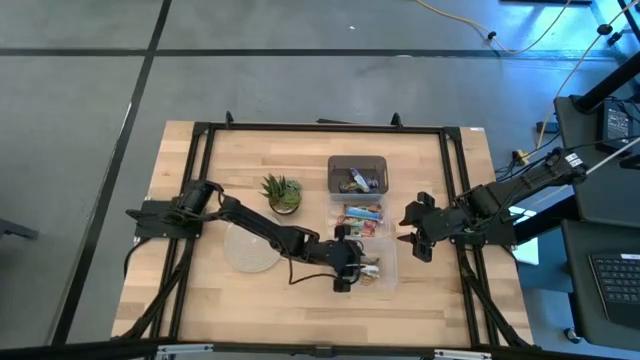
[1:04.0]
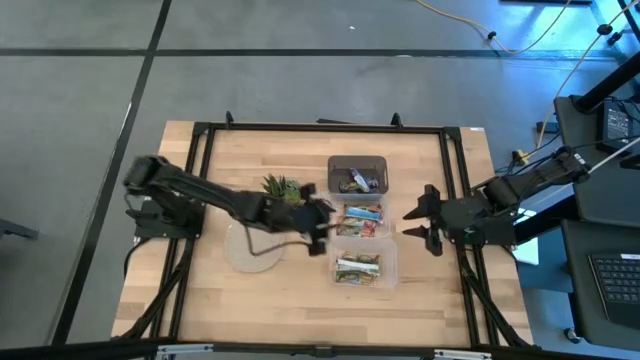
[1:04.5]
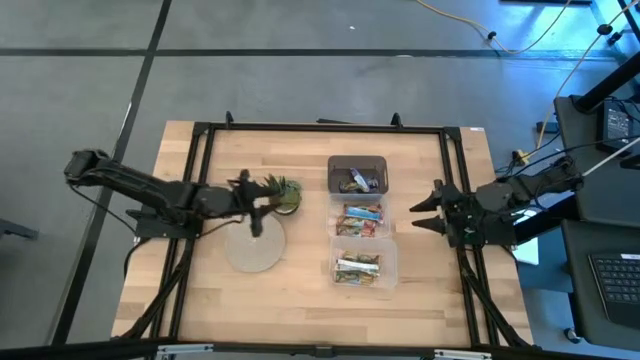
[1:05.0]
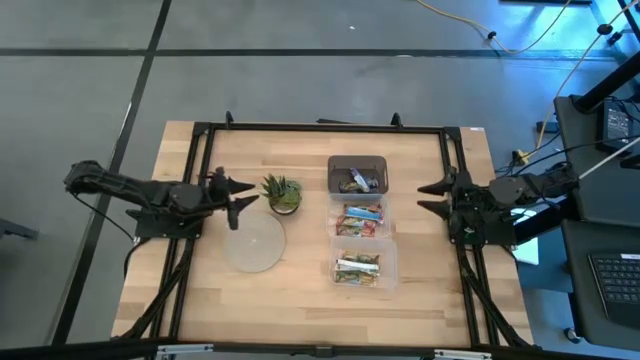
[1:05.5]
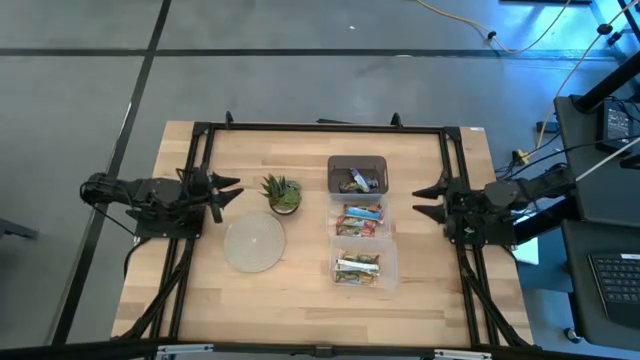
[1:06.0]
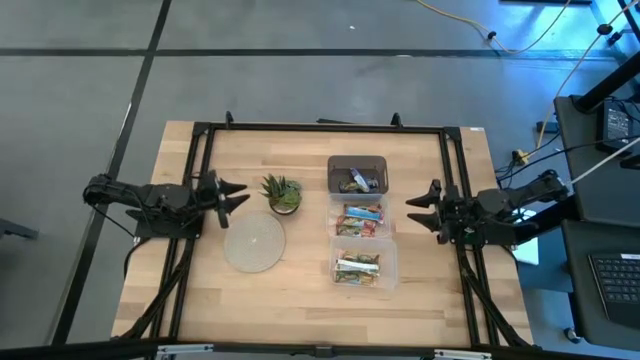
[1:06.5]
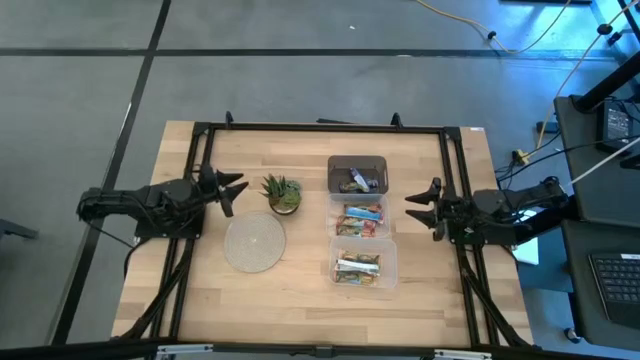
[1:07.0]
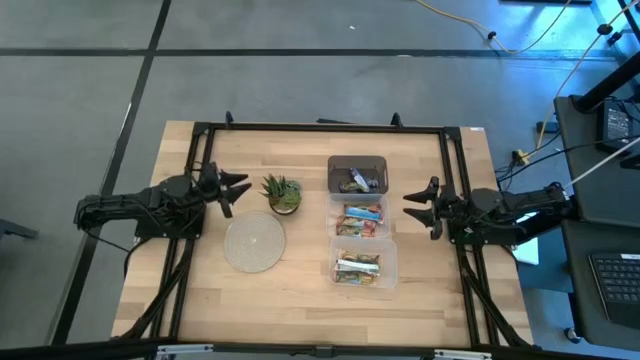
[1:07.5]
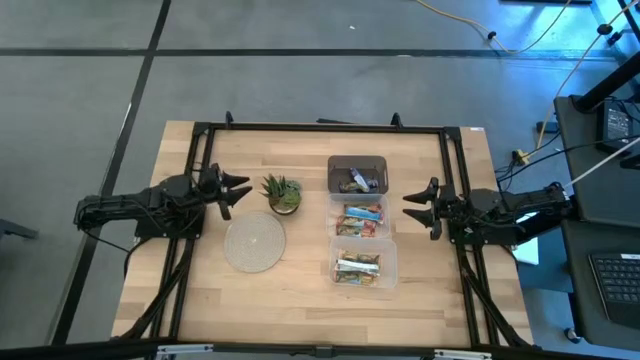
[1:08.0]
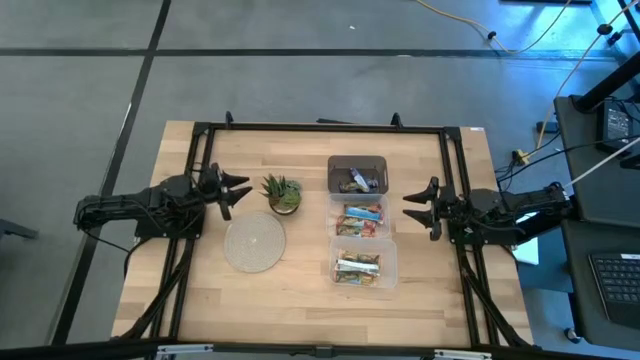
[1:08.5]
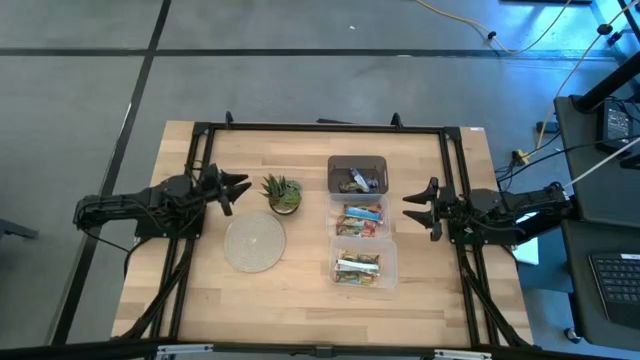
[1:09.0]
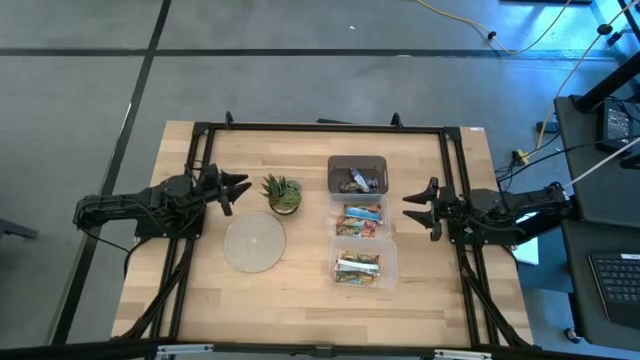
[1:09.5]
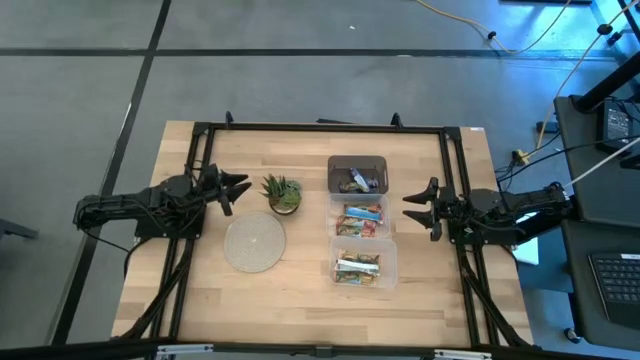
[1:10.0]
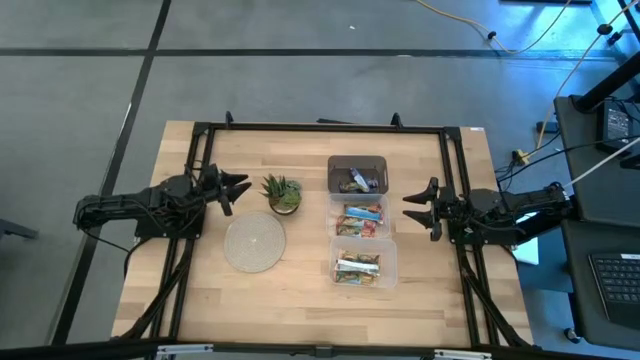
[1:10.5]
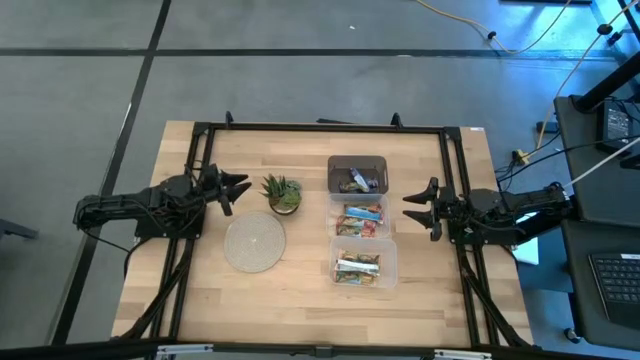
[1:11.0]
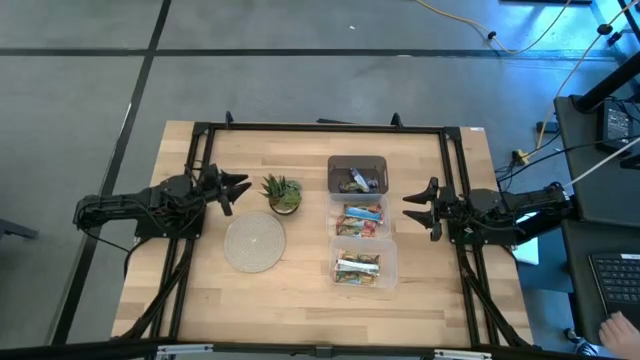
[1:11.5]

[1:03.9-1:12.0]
Task: Pick and place Granola Bars by type
Return to Home Position

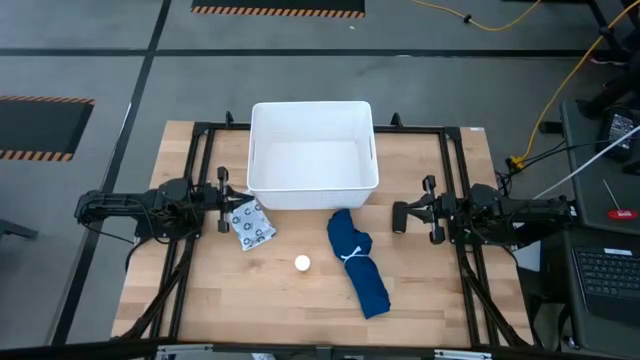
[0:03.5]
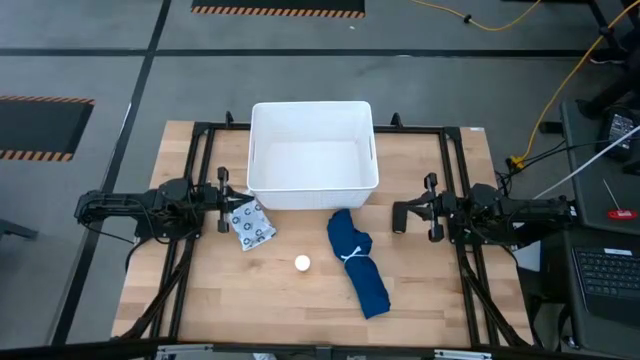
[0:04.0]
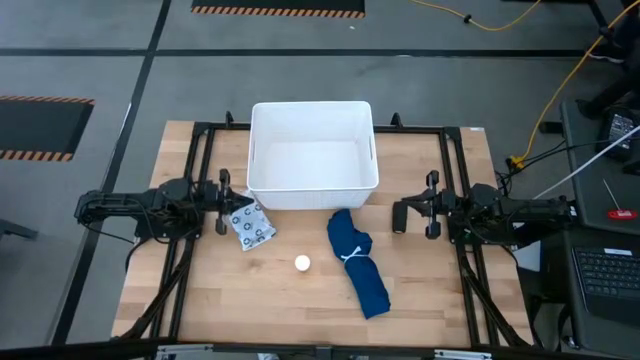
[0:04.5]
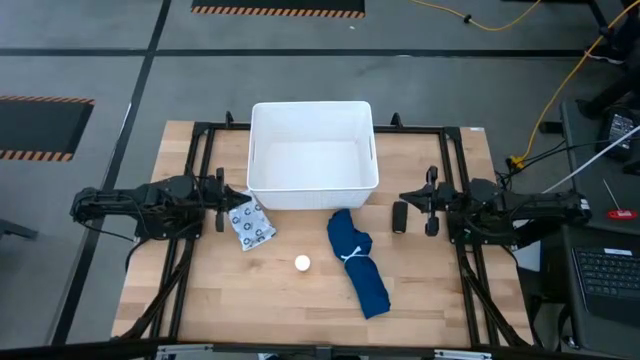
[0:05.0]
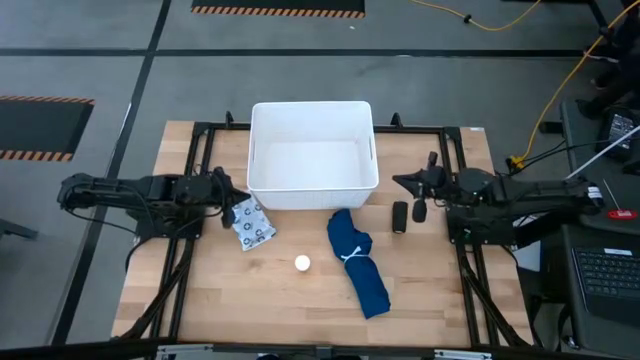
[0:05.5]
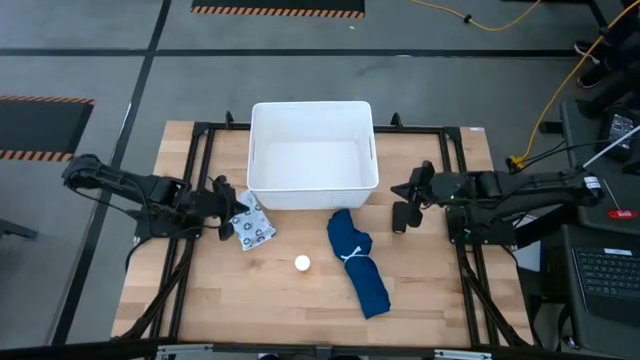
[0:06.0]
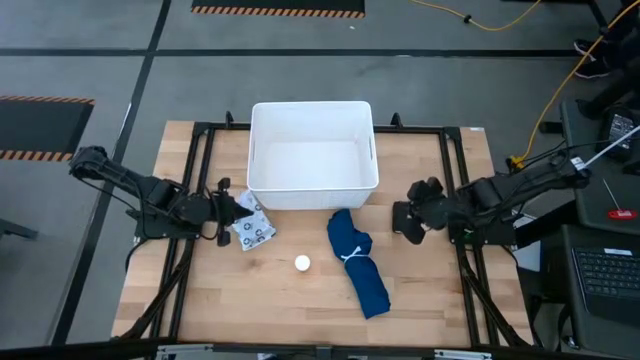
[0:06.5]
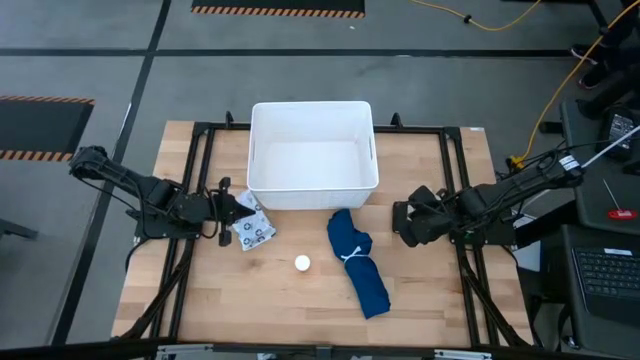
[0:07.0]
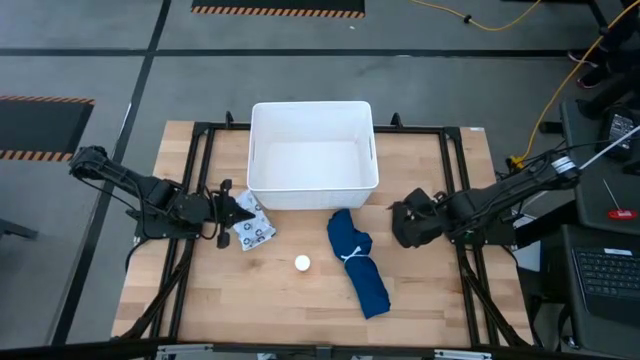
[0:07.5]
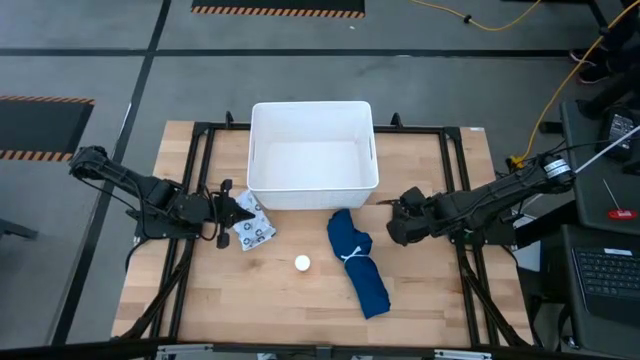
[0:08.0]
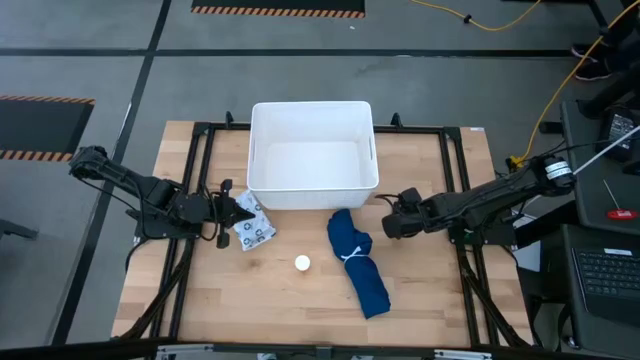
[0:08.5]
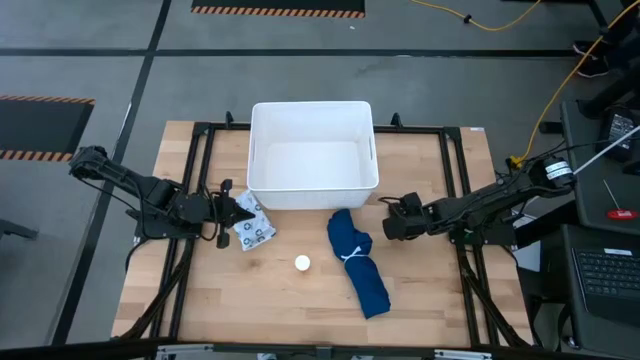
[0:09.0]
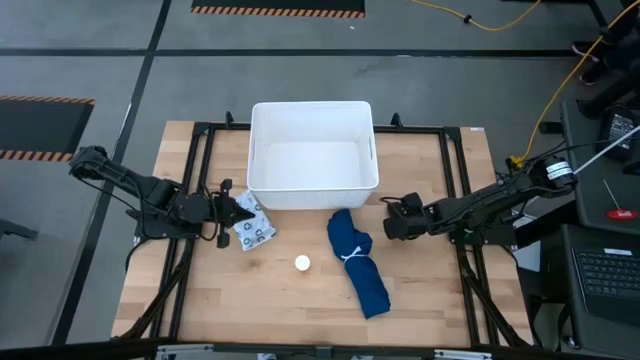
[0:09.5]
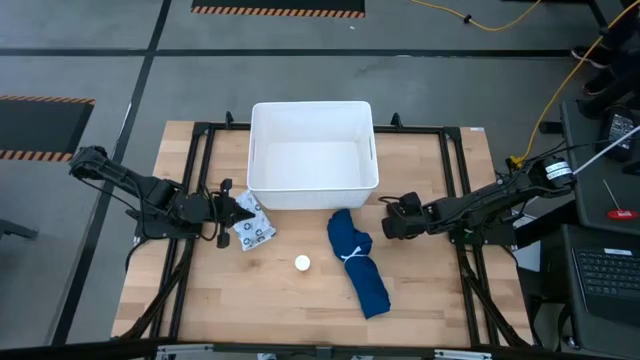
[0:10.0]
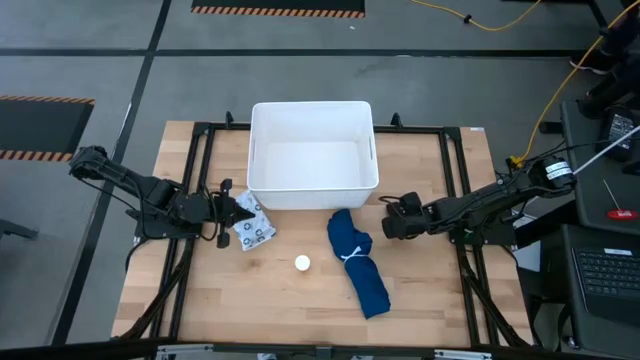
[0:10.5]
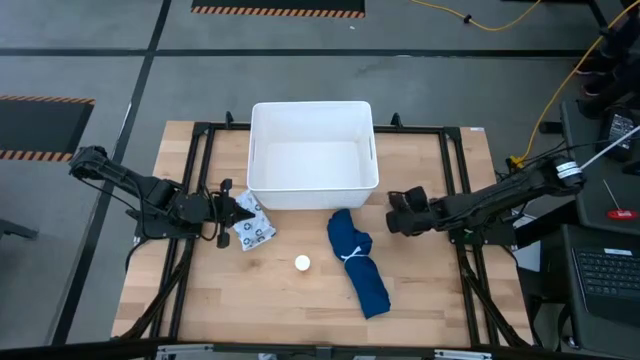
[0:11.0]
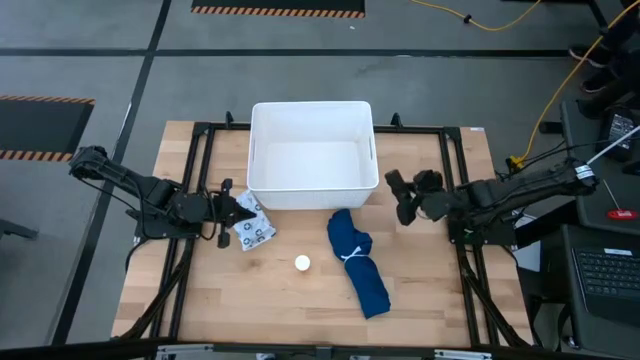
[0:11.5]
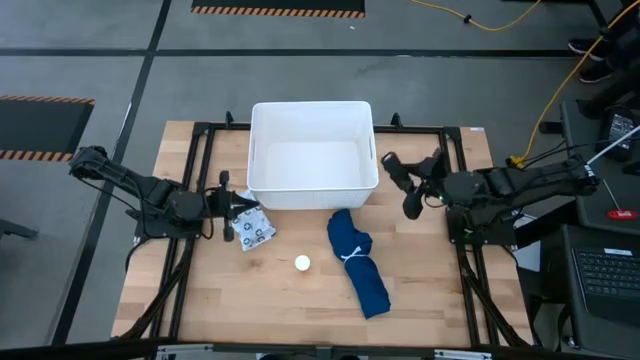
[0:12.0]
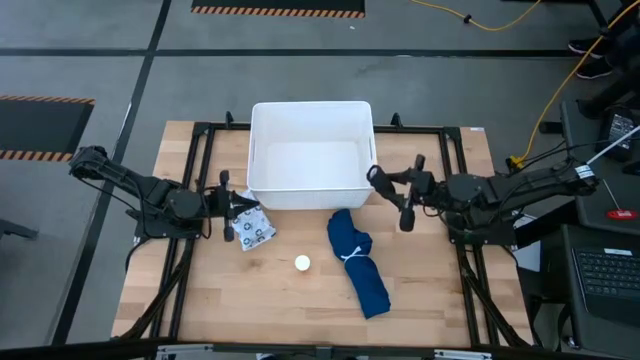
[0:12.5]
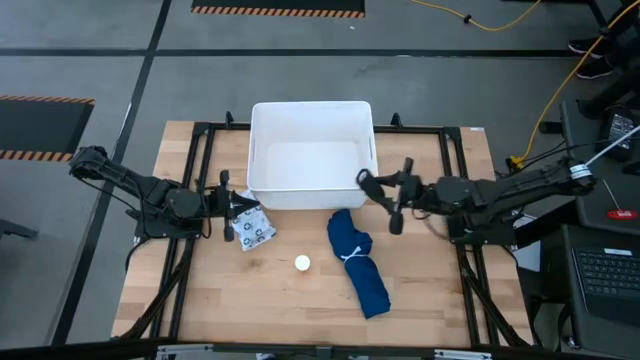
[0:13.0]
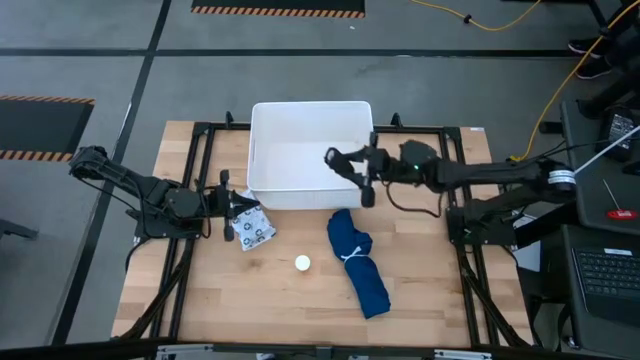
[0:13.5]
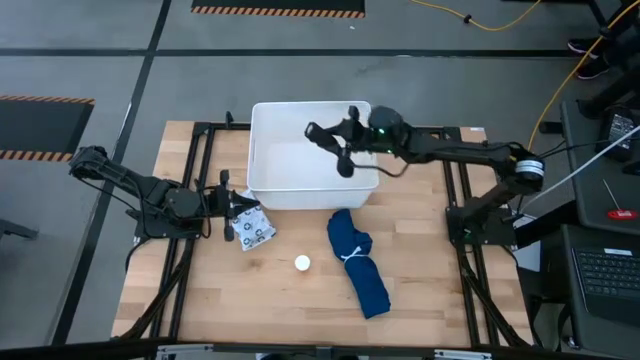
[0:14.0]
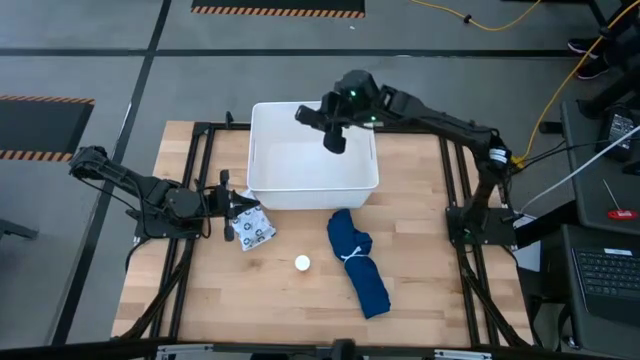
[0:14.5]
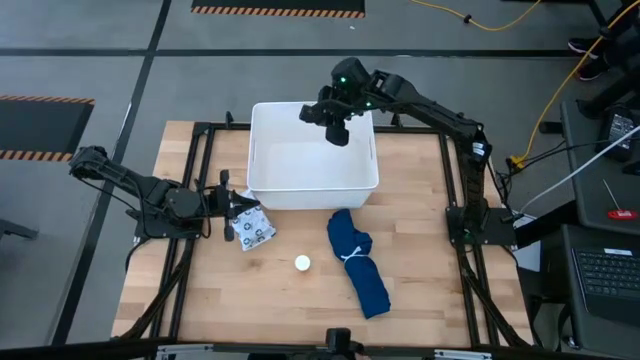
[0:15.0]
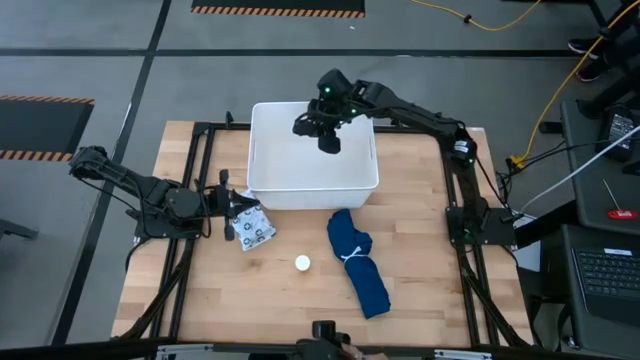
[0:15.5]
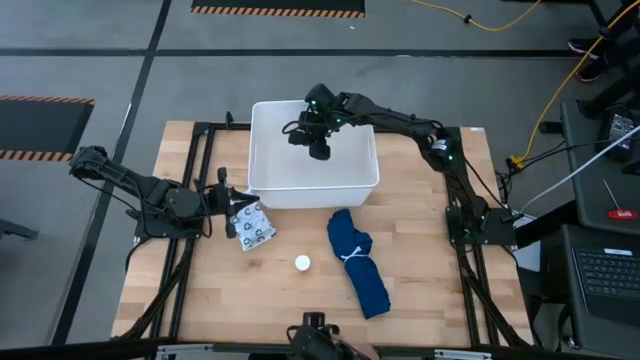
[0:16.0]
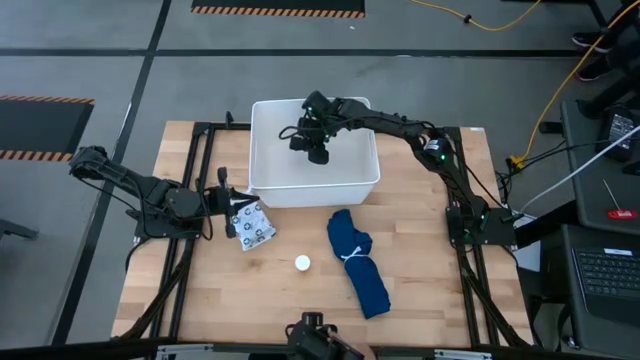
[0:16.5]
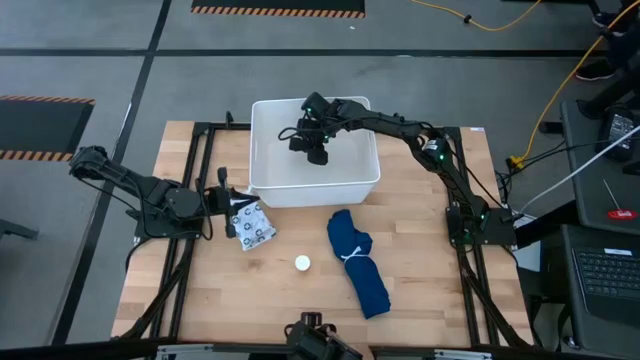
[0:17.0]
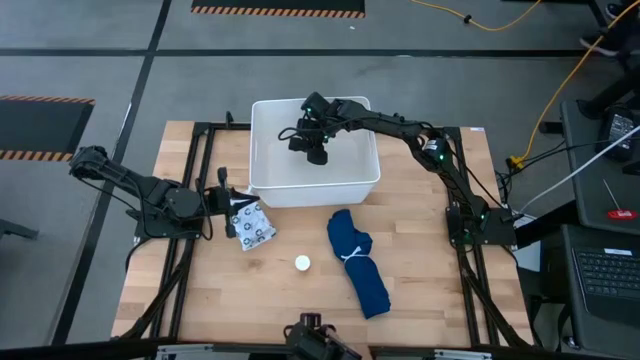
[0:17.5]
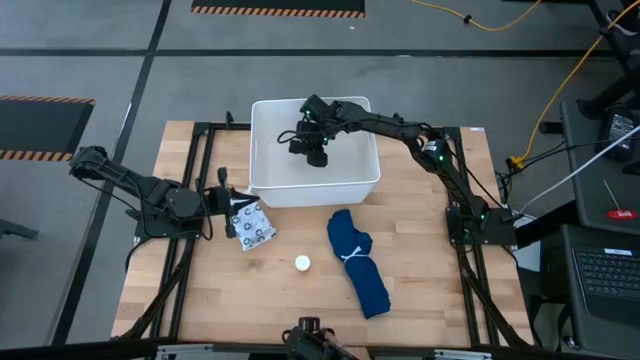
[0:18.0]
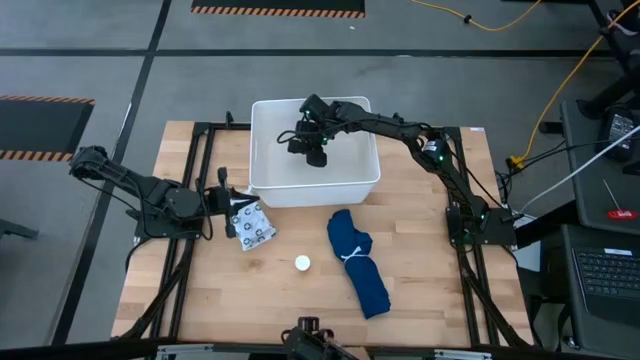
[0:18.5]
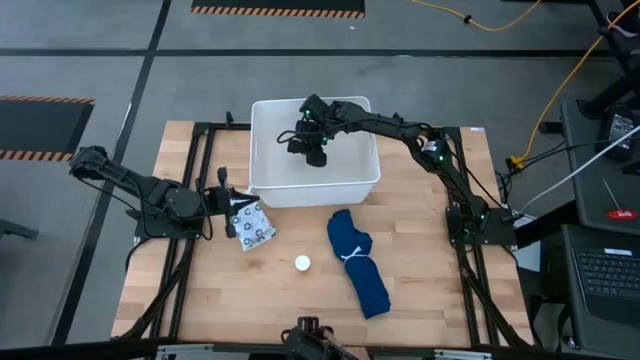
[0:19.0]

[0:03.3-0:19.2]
Task: Pick & place medical supplies in basket/bin
Put the black bandage into the white bin
